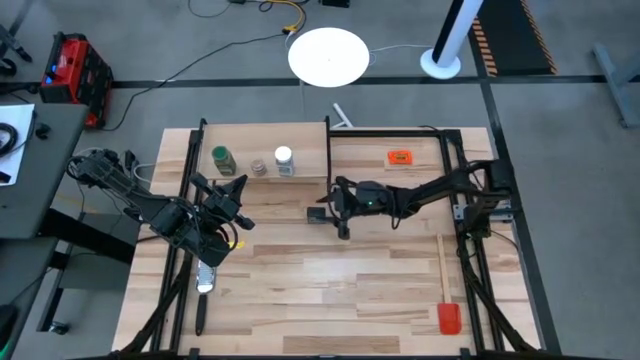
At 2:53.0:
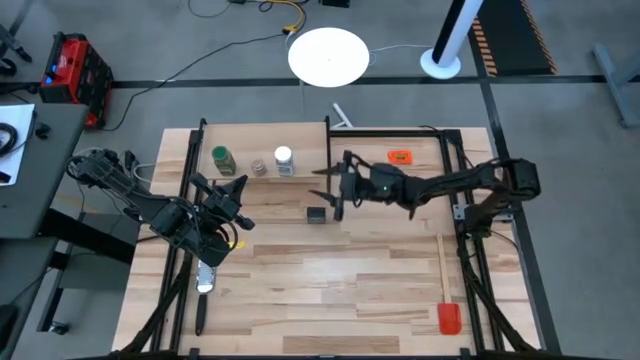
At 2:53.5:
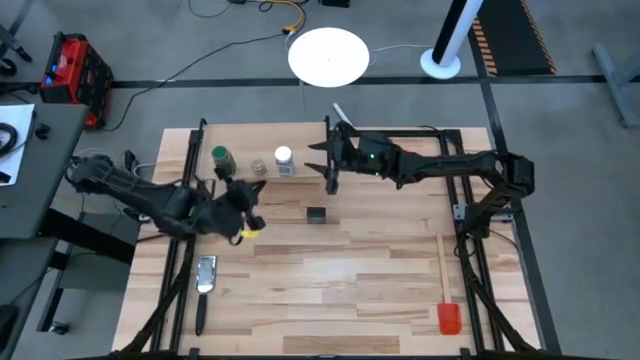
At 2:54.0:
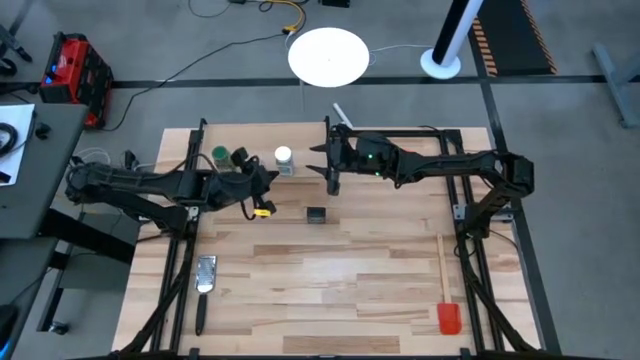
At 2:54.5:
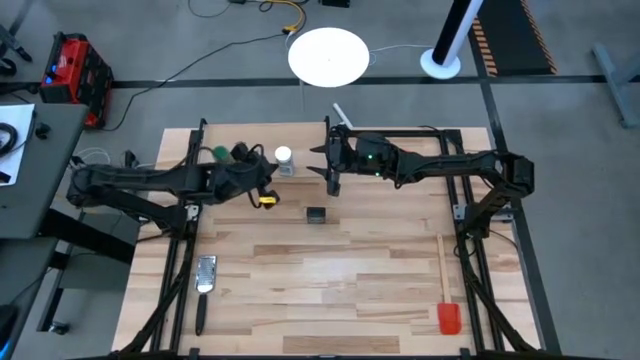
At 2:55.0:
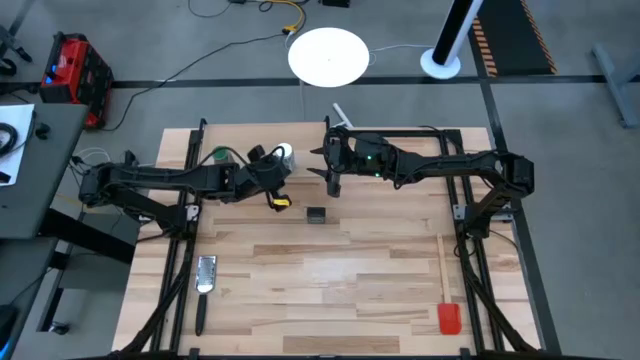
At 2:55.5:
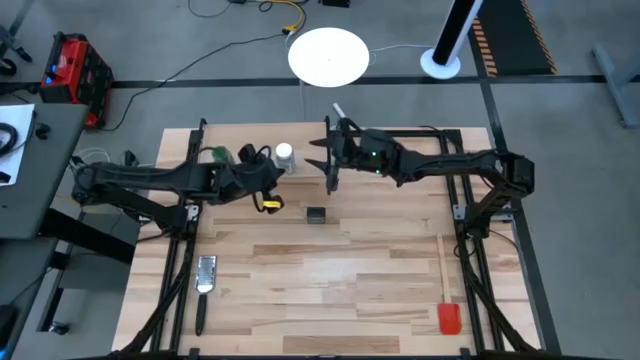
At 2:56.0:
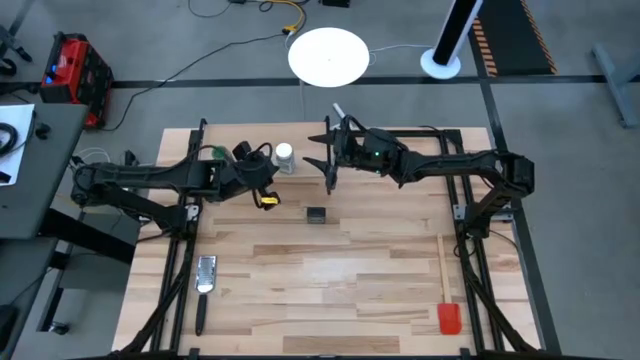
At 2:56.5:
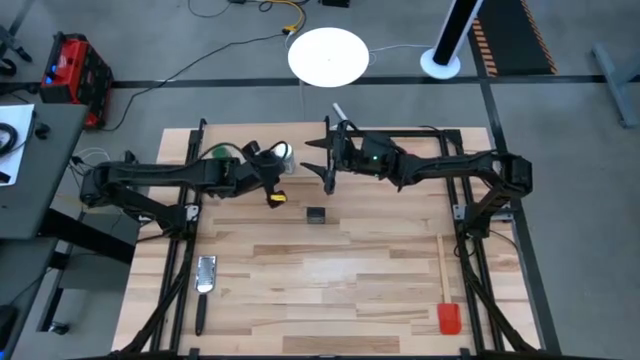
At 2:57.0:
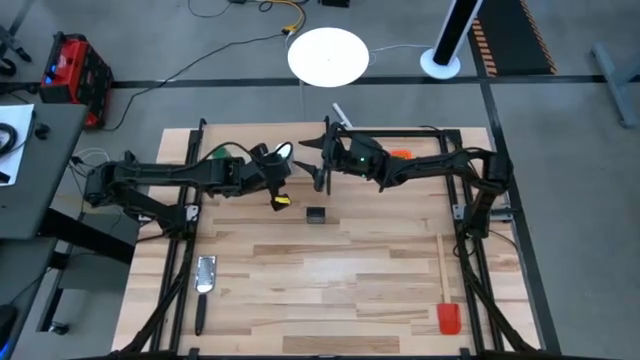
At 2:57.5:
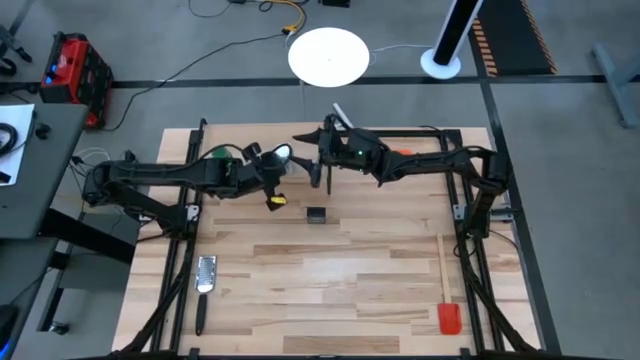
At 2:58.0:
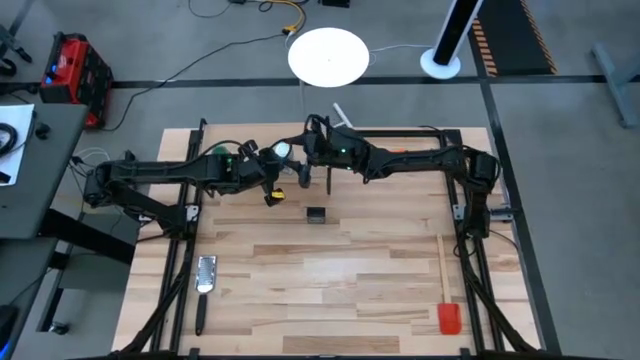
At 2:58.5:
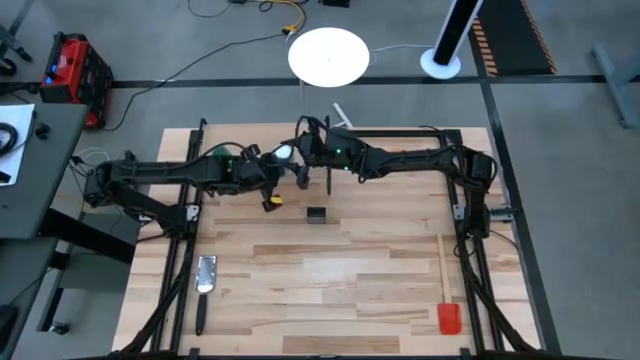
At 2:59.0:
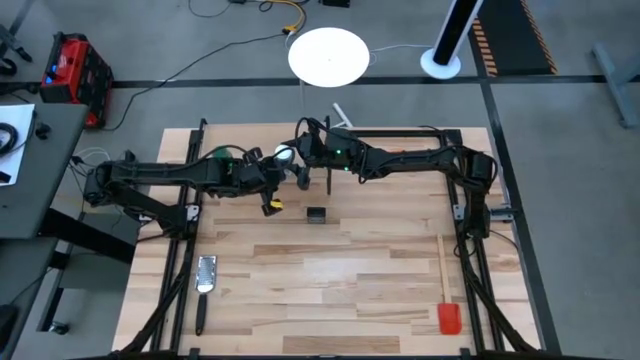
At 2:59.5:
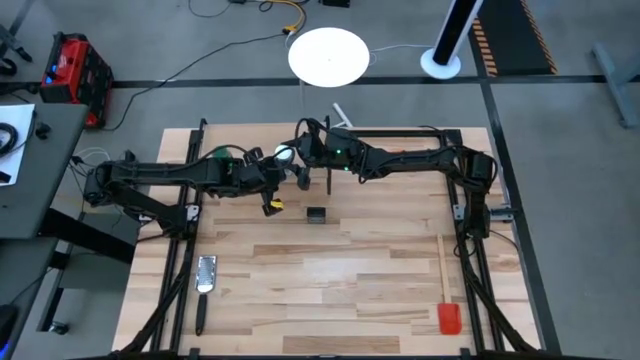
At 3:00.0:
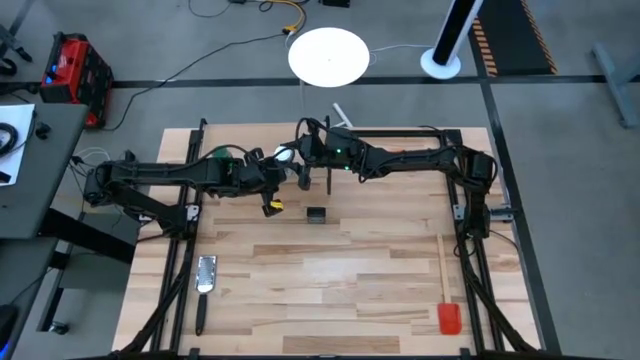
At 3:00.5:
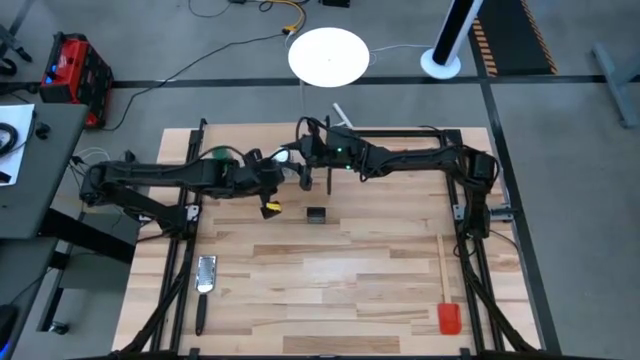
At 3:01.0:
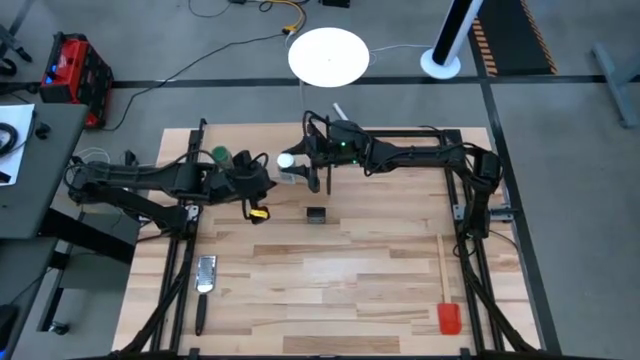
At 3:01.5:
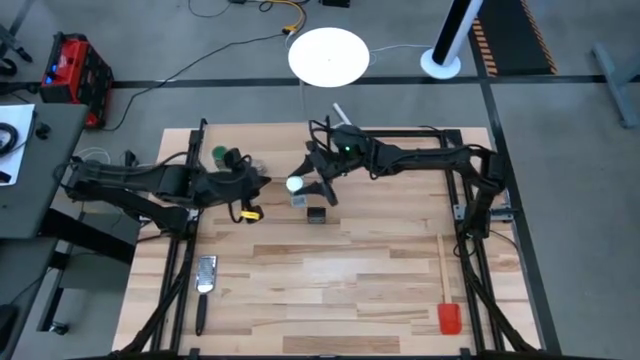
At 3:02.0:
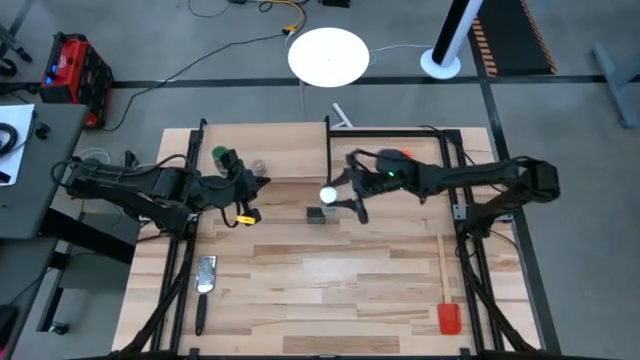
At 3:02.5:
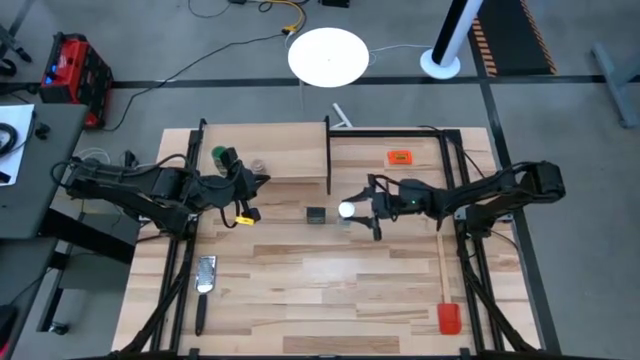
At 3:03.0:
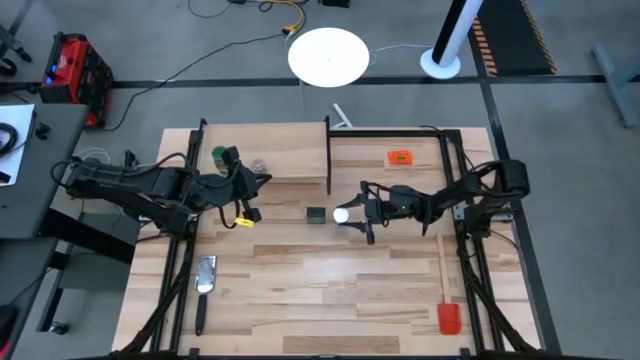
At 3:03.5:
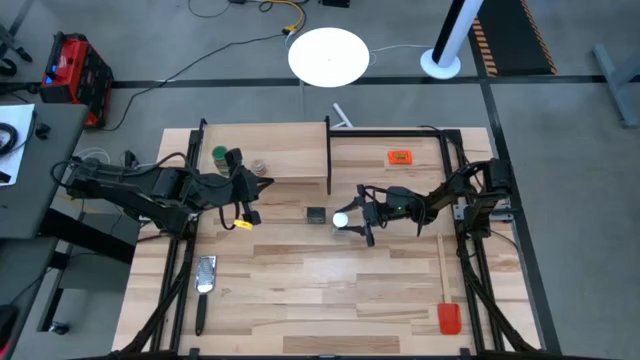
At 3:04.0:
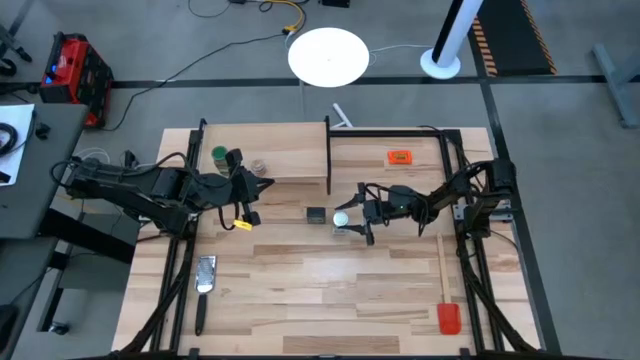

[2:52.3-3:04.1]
Task: Shelf spices
Remove the white seasoning bottle from the shelf

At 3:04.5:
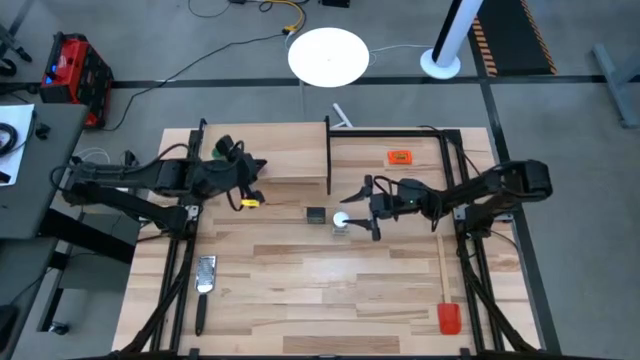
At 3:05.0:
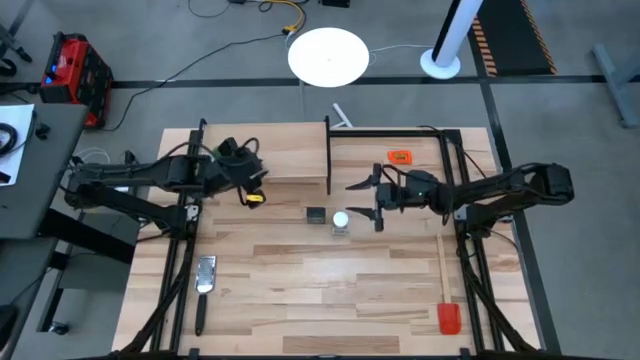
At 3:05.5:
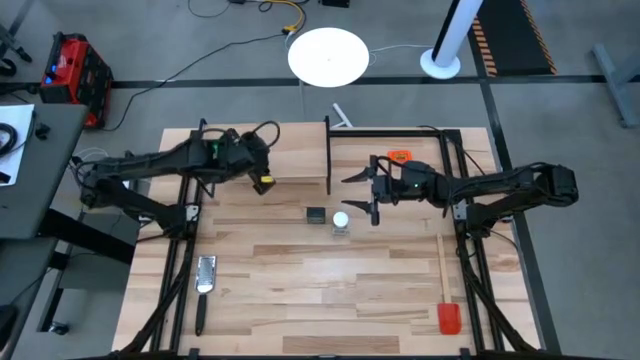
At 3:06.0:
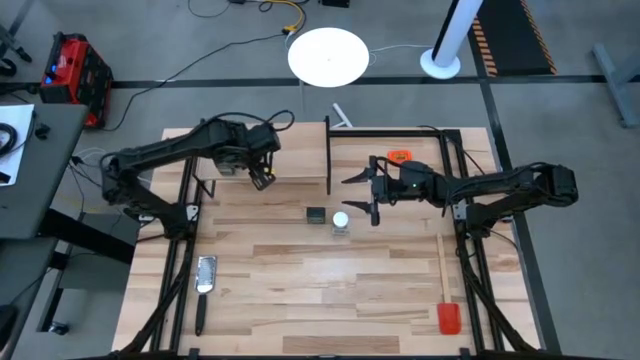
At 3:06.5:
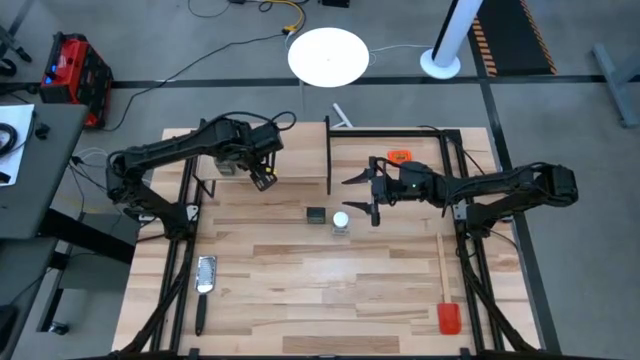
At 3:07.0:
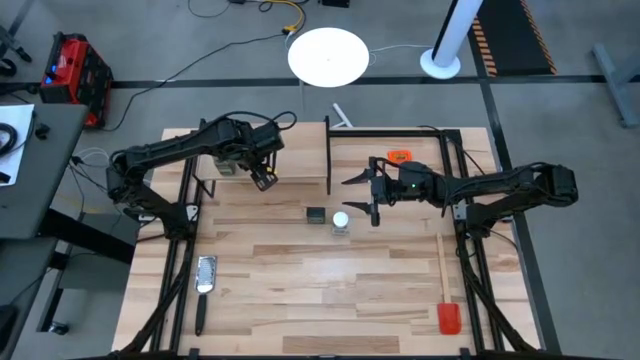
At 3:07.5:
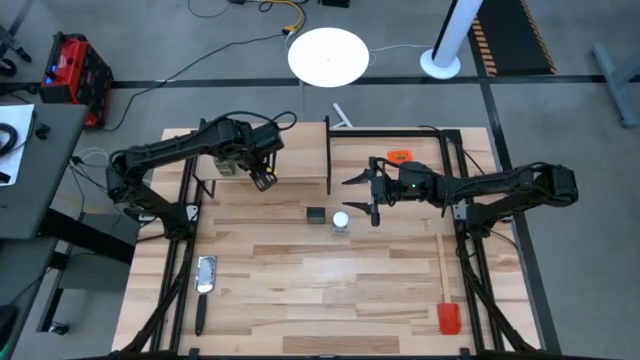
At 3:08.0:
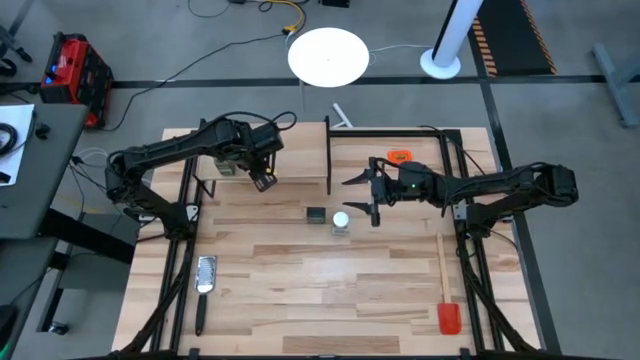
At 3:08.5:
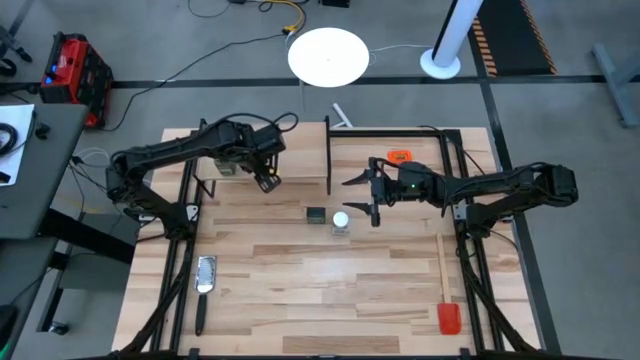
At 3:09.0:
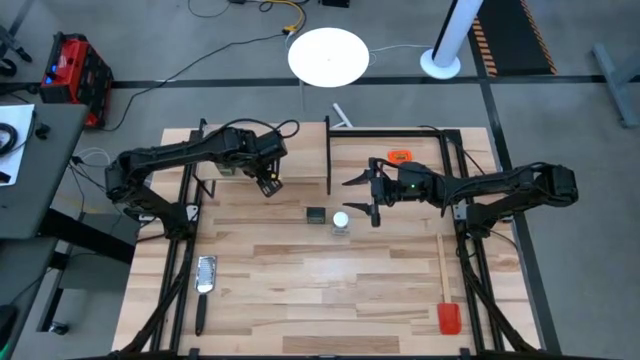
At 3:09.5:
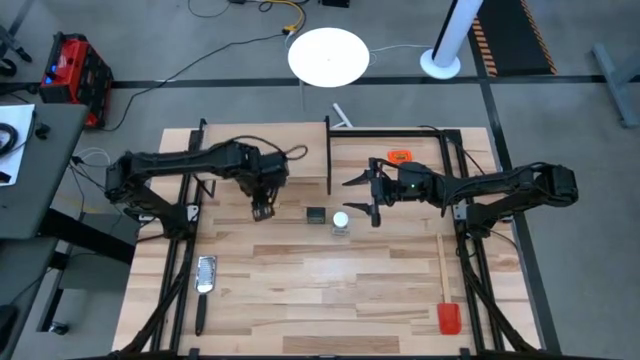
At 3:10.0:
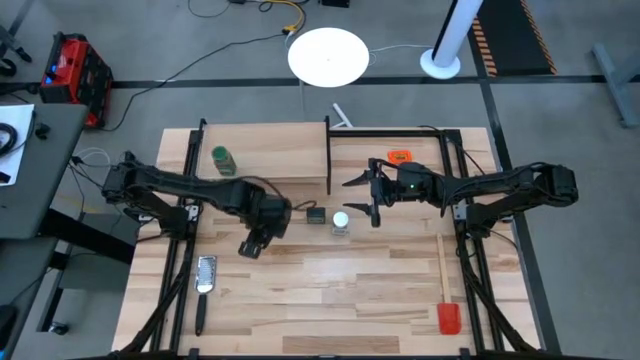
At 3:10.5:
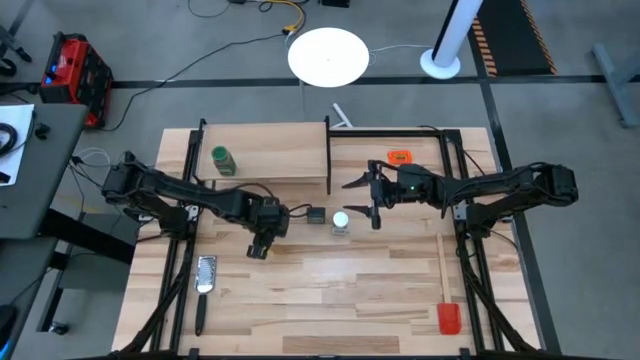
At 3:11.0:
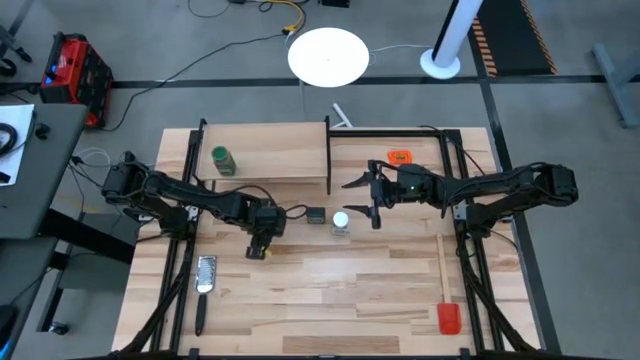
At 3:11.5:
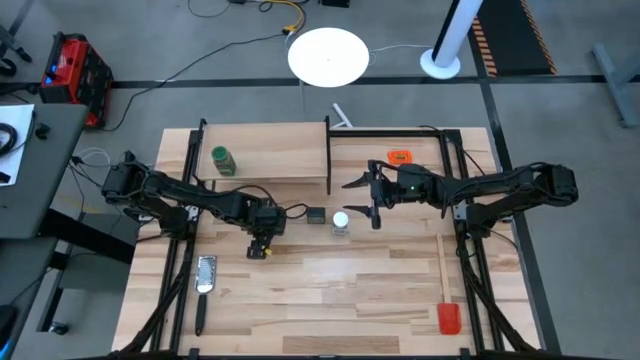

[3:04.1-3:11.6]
Remove the brown seasoning bottle from the shelf

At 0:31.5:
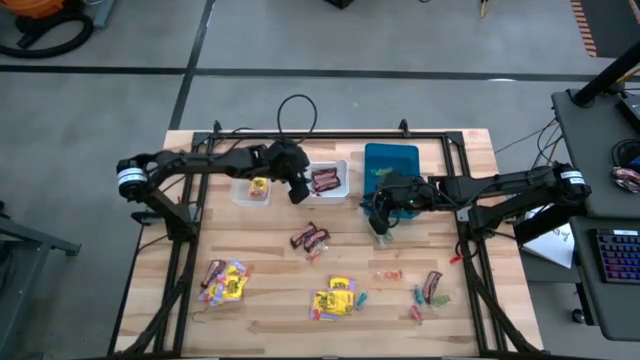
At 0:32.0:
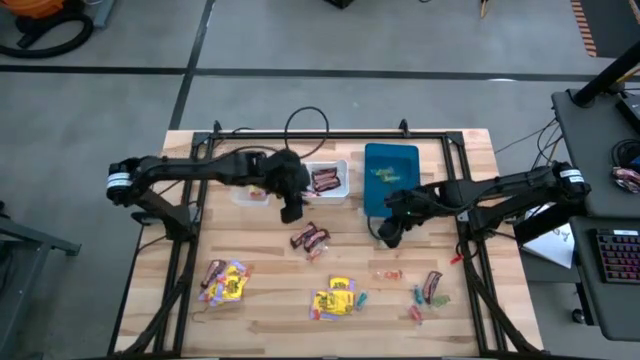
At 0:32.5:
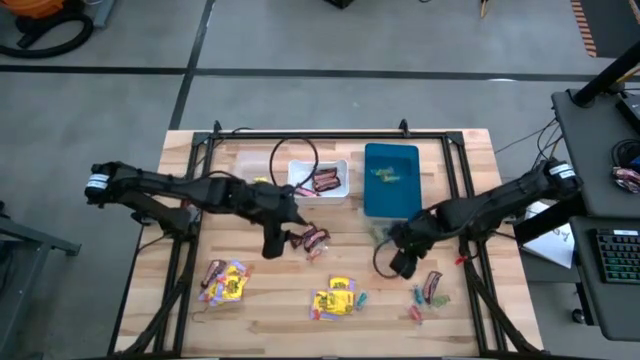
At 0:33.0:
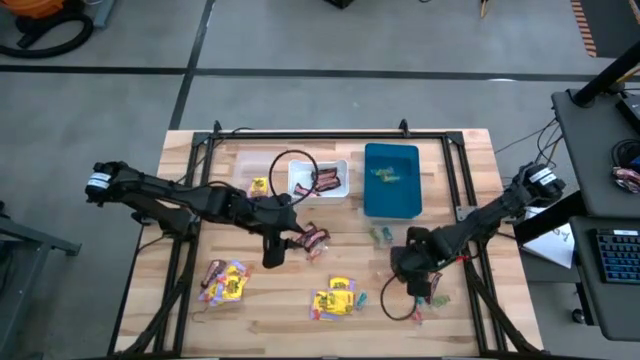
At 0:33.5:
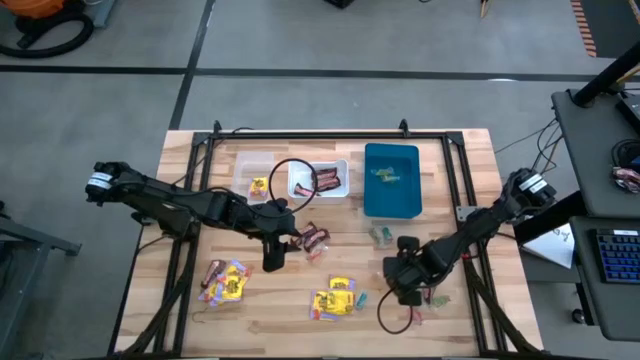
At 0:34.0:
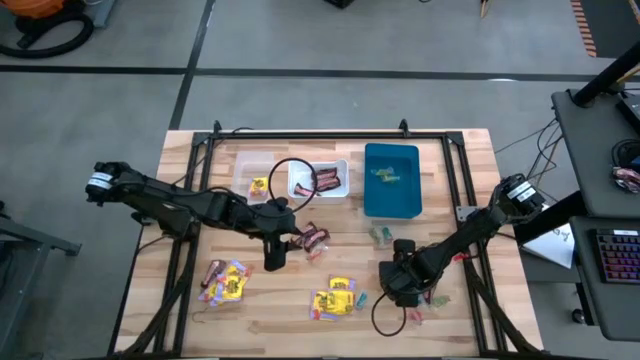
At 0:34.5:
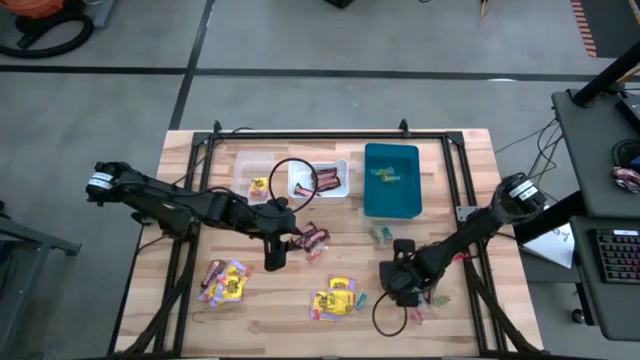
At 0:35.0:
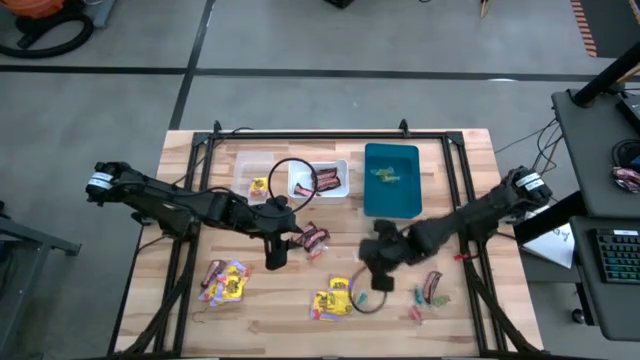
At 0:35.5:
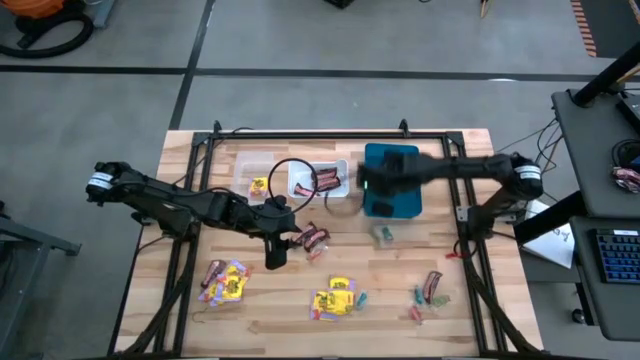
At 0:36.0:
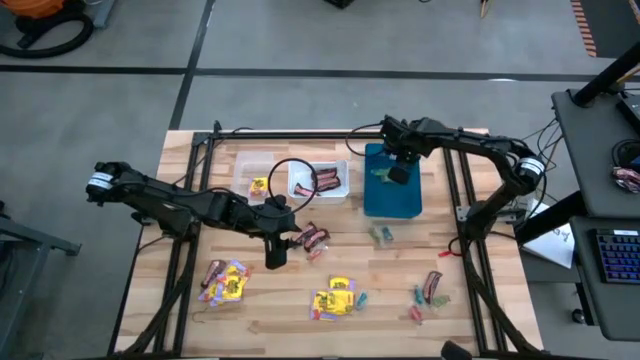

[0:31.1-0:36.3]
Task: Sort candy
Put the orange candy into the blue bin
